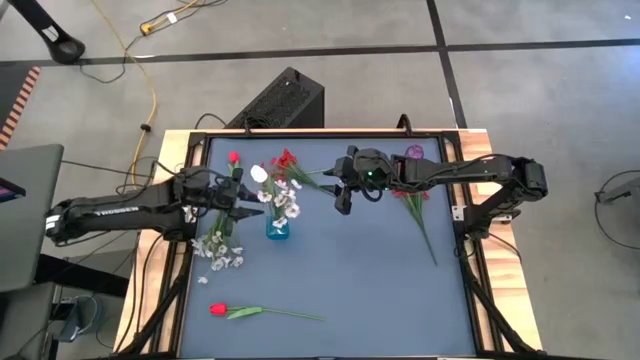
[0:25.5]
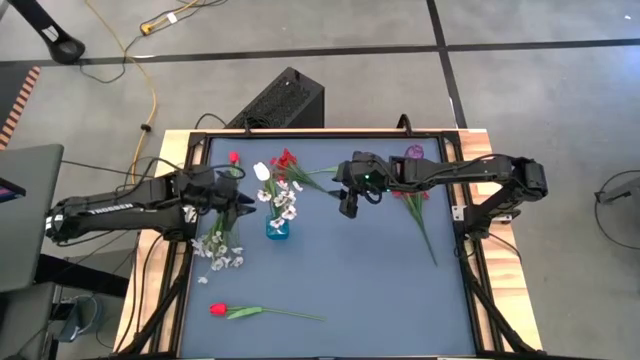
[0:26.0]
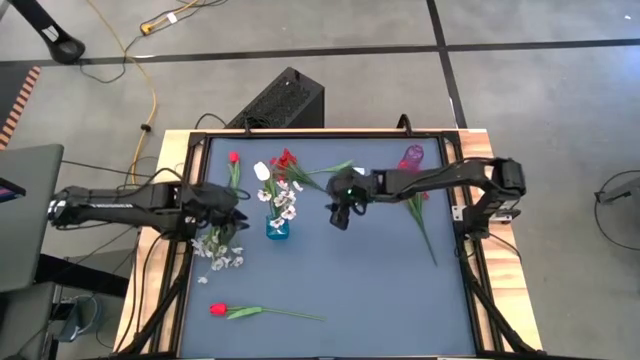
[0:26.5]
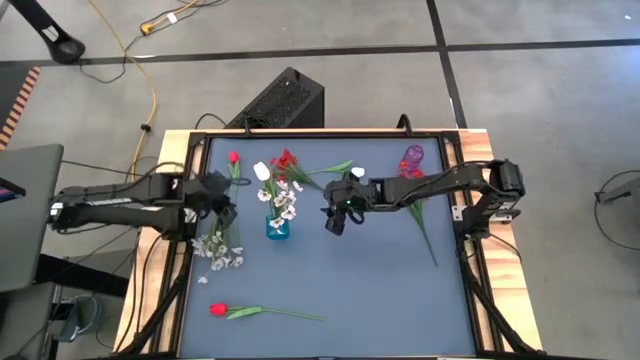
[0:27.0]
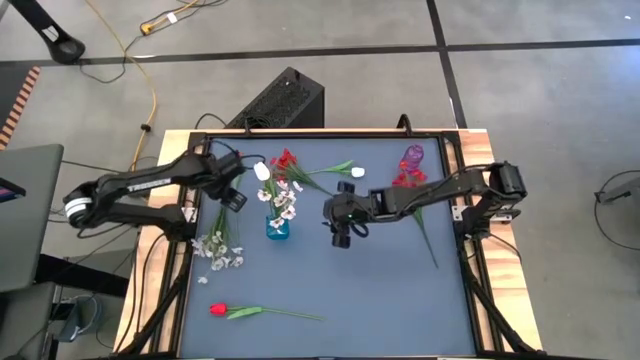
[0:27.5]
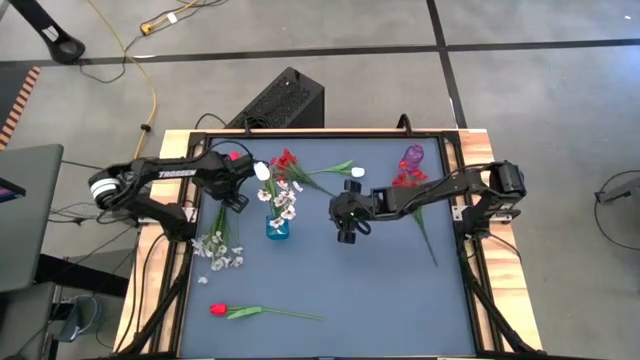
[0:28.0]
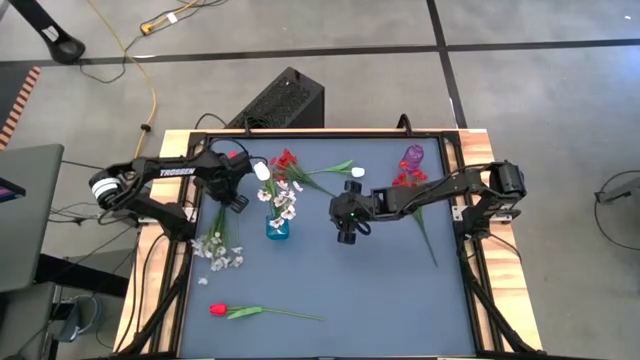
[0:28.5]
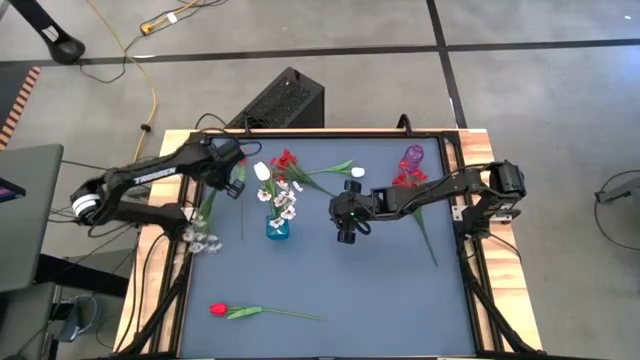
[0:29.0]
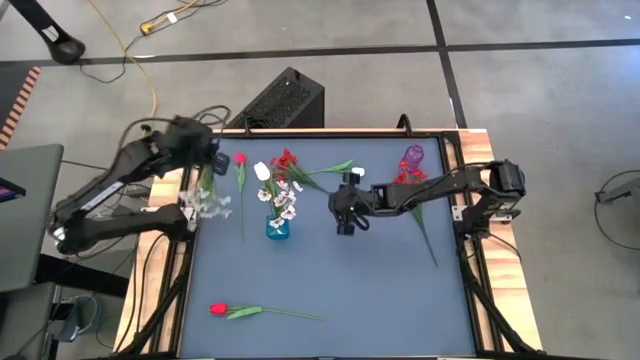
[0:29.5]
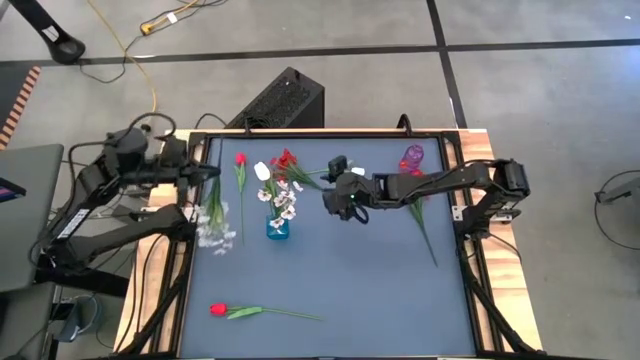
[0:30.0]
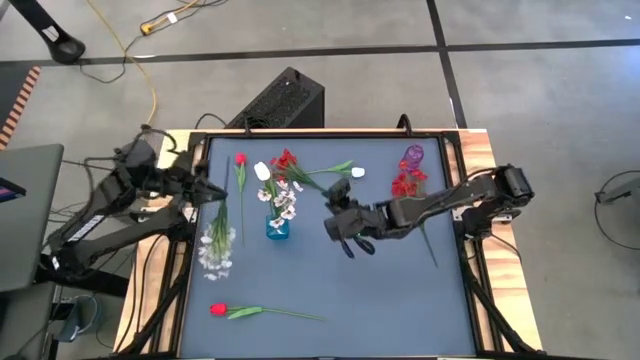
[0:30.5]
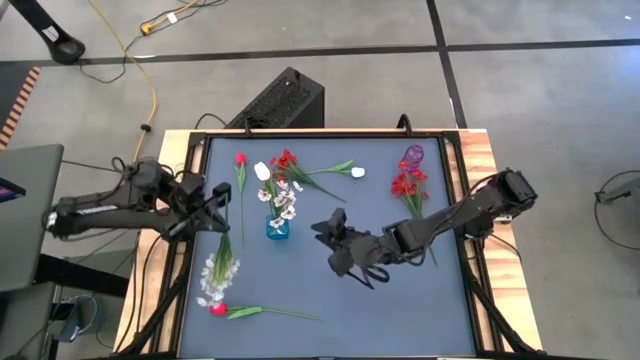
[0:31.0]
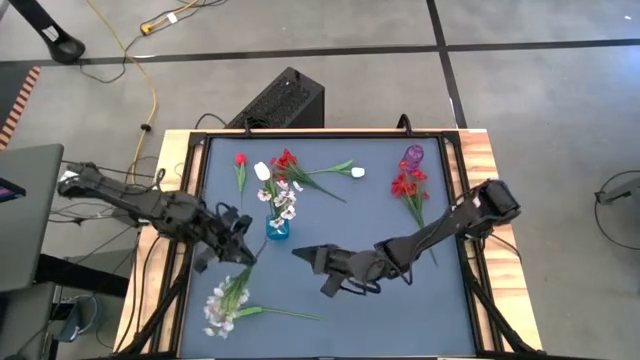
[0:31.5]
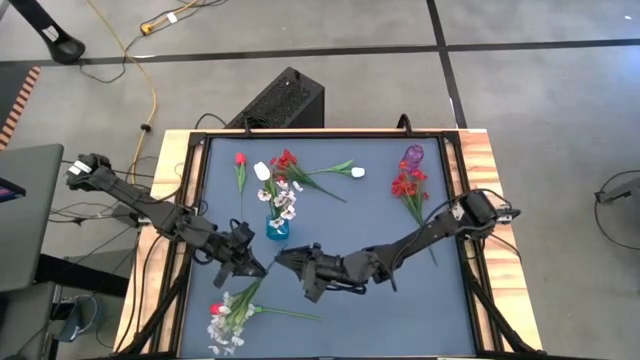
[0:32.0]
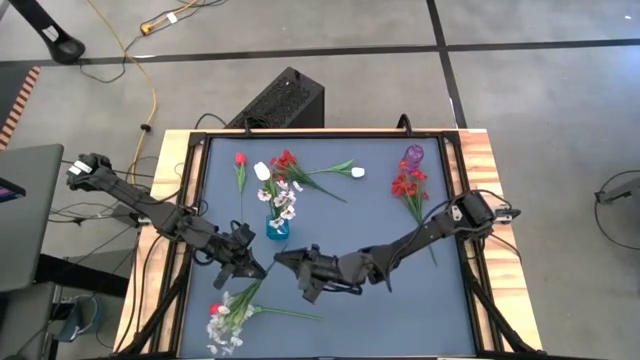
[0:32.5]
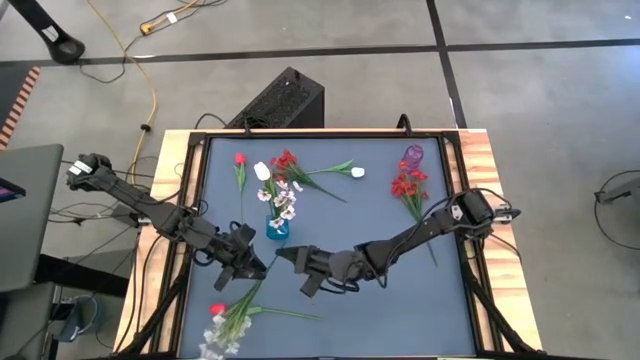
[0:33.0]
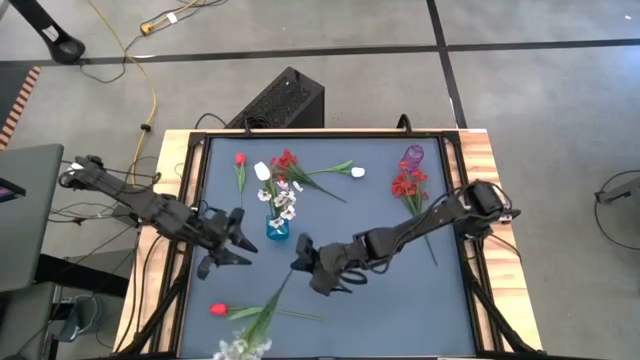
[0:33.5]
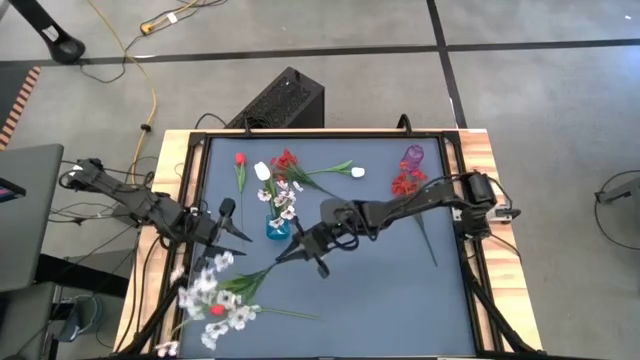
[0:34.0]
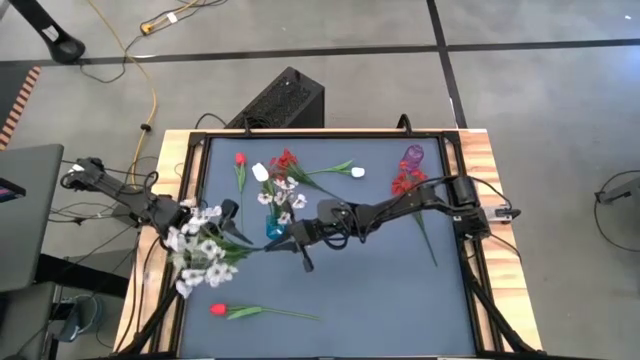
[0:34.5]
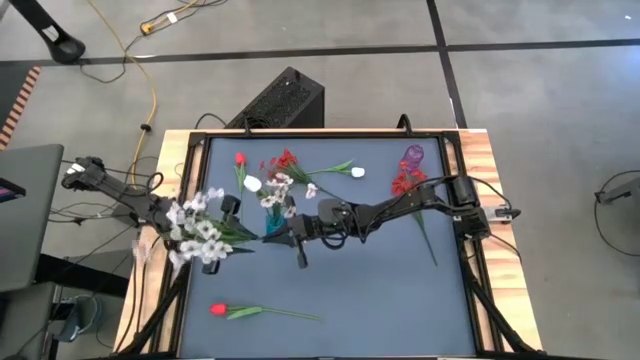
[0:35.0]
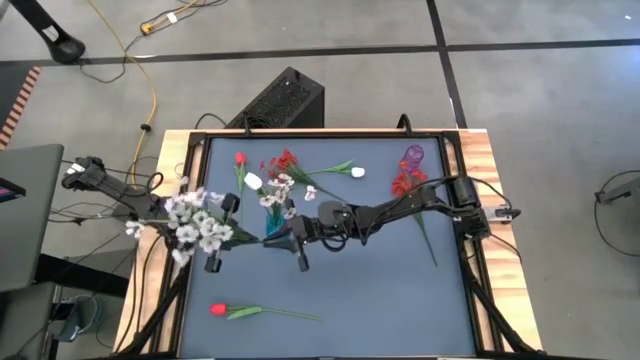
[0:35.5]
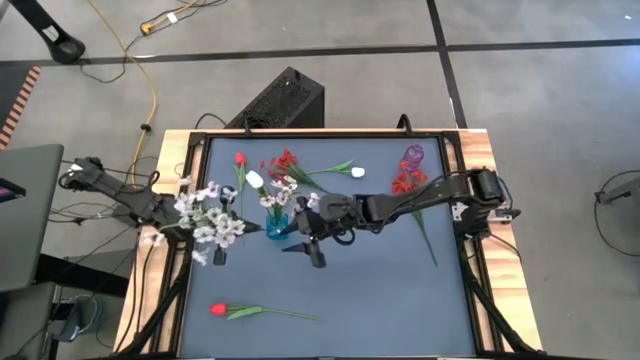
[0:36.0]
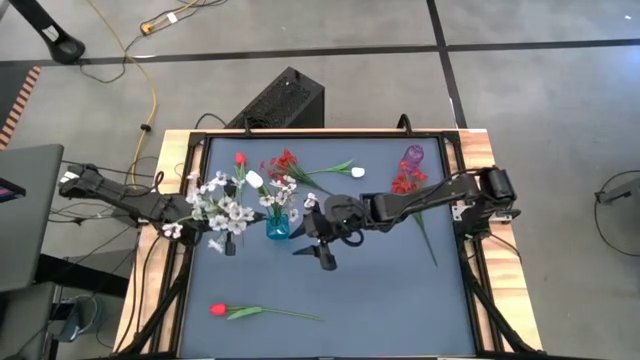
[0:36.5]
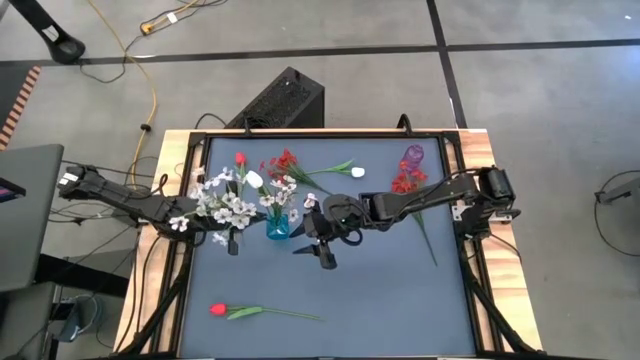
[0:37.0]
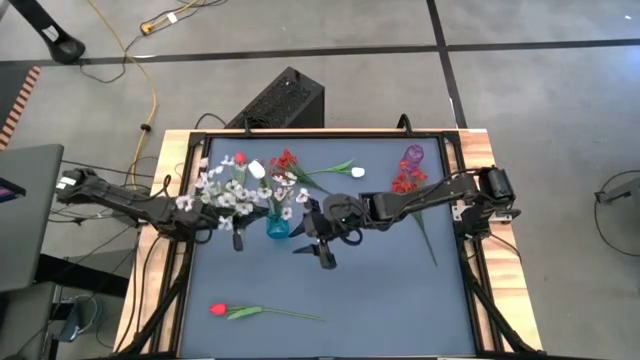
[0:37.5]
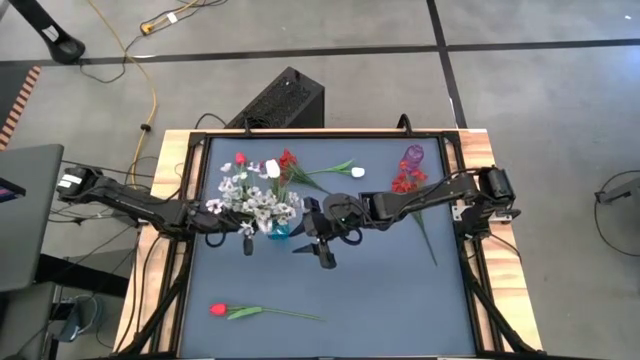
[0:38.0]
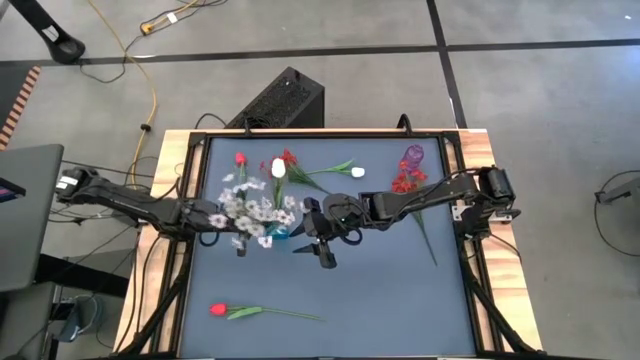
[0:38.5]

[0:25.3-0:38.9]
Task: Sort flowers into vase by color
Put the left white flowers into the blue vase

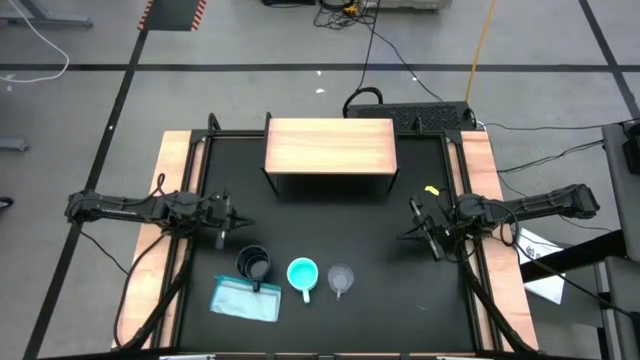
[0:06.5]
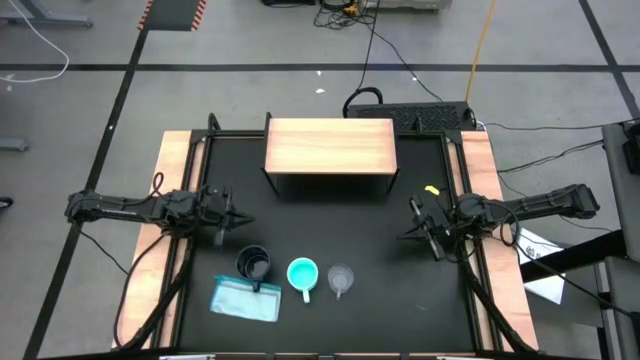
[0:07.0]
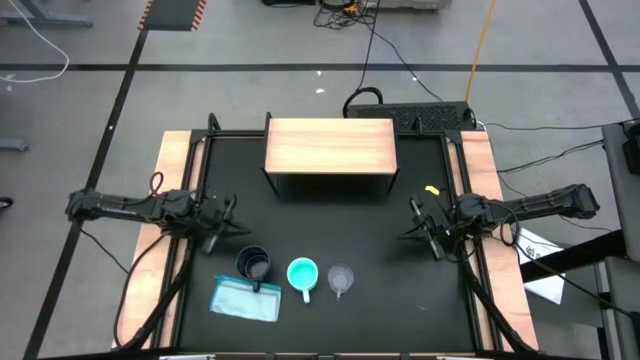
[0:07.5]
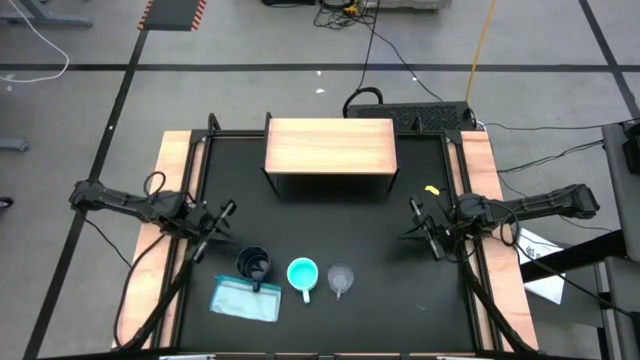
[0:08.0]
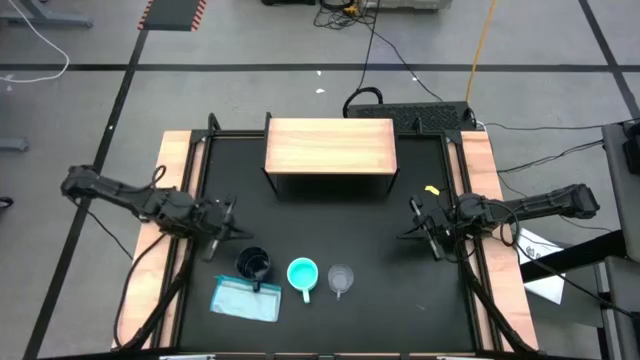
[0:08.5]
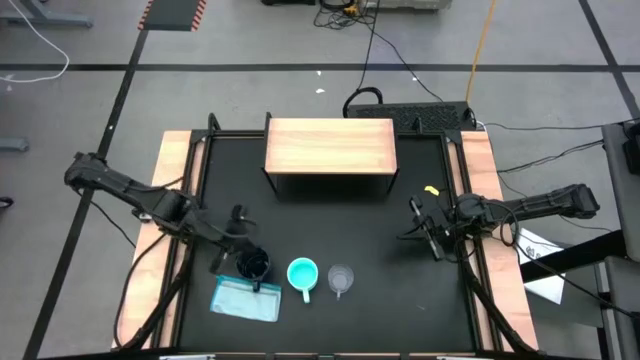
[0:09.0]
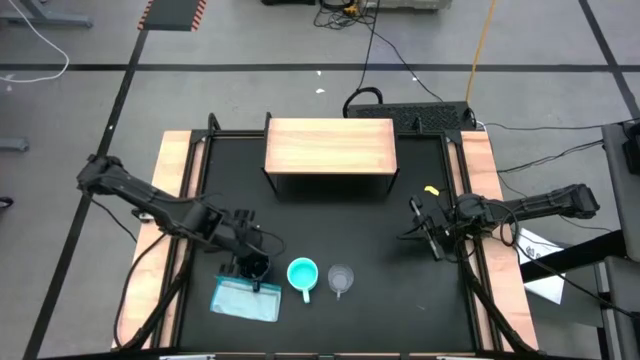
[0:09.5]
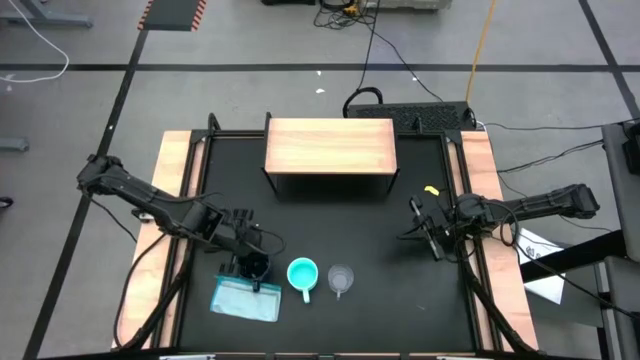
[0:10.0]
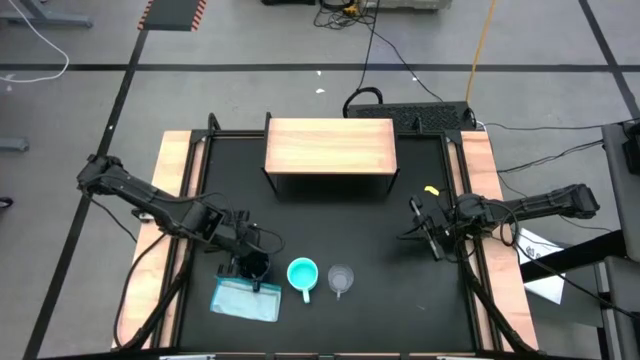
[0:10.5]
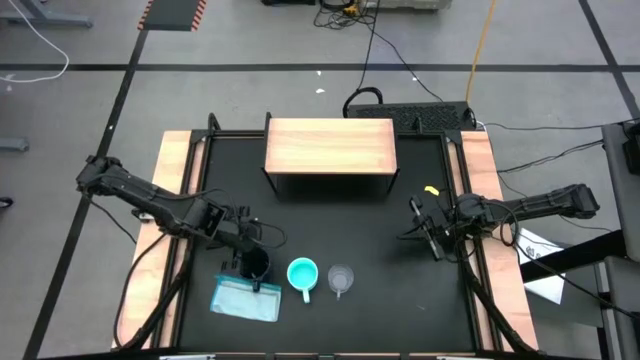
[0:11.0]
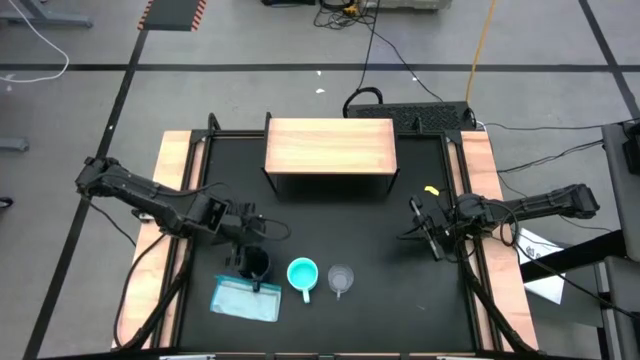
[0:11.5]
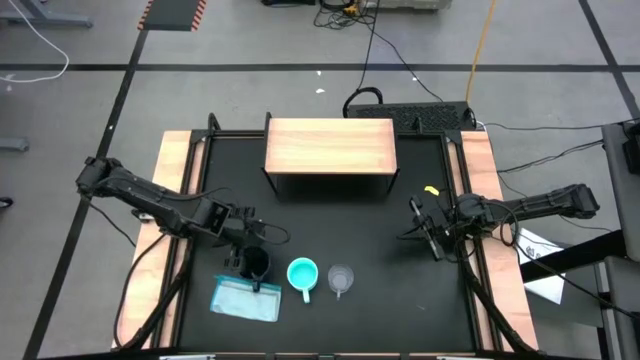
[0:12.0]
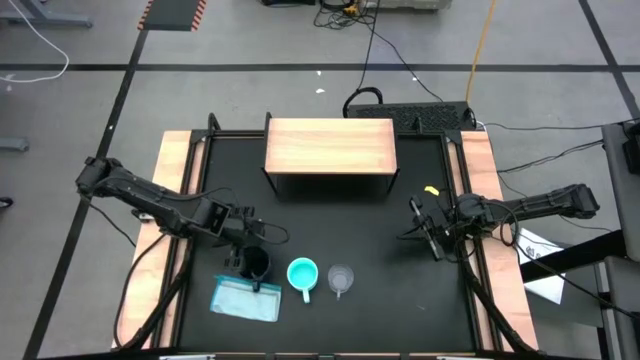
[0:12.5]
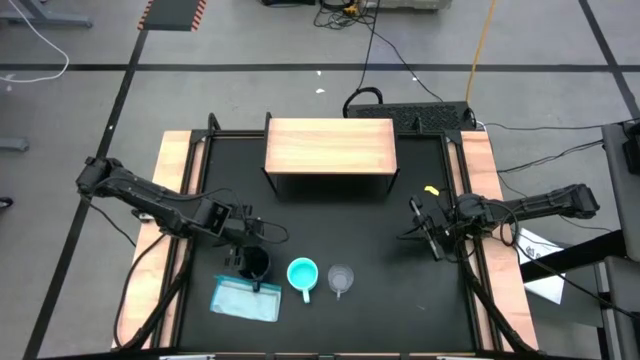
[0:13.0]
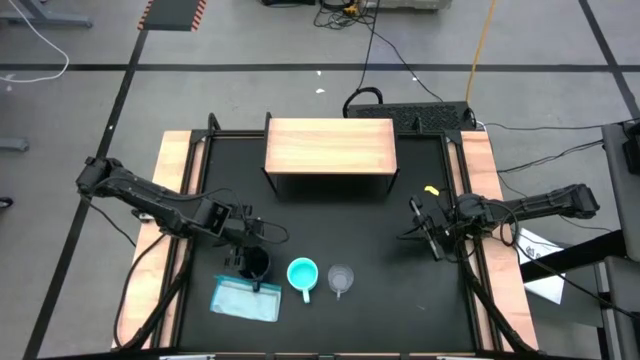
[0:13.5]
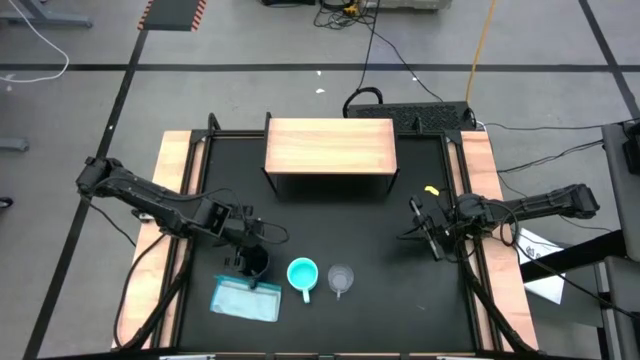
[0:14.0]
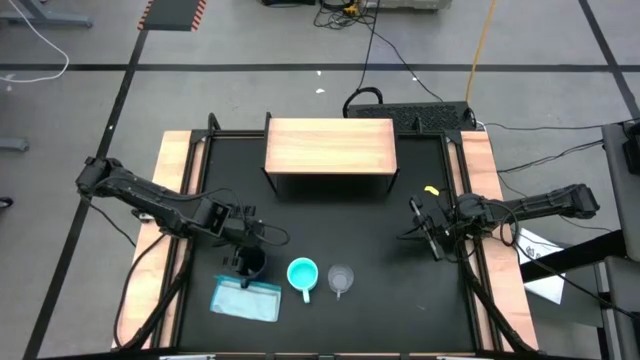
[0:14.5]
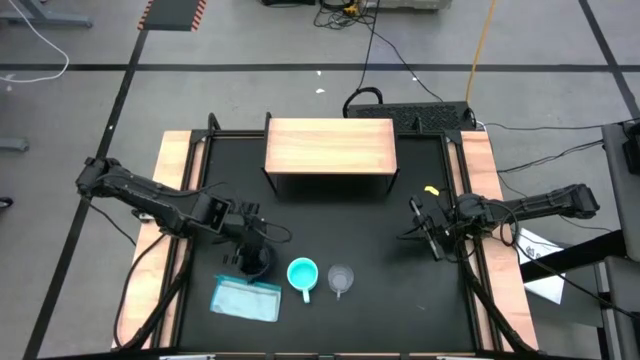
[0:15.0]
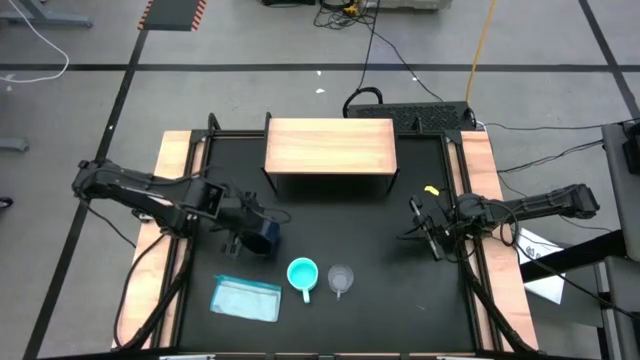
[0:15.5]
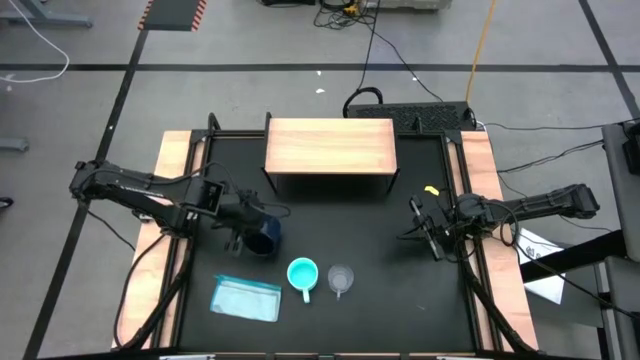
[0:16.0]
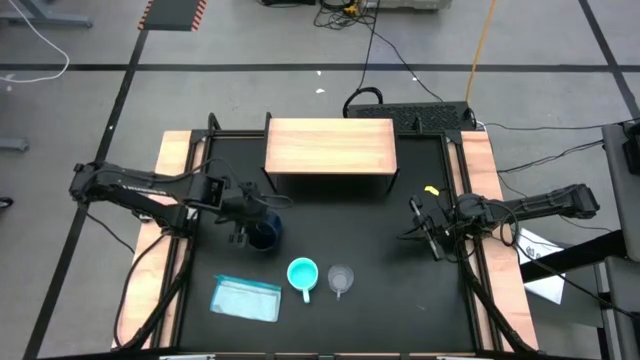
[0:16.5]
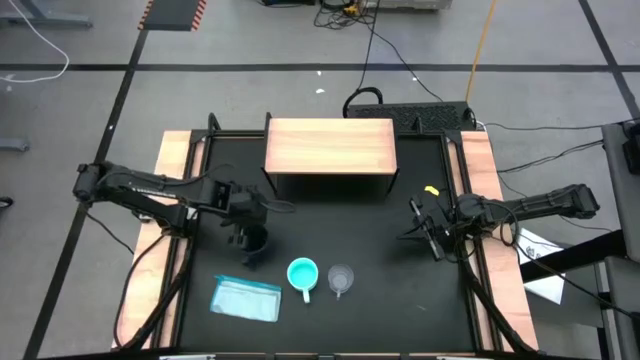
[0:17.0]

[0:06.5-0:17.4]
Task: Stack small to large cups/mugs on shelf
Put the dark blue mug on the shelf
